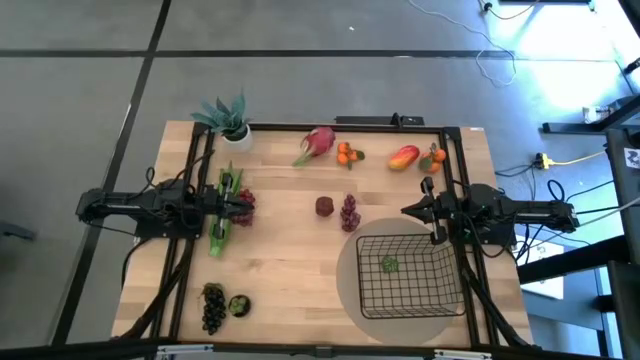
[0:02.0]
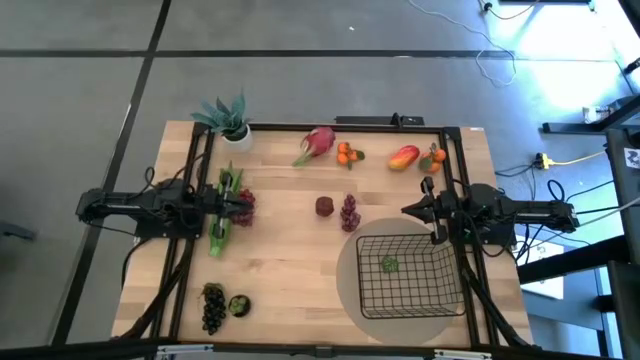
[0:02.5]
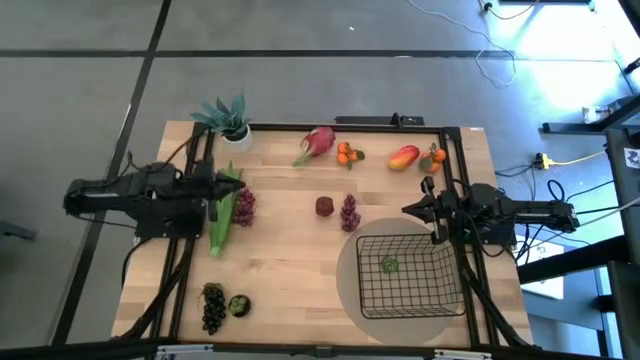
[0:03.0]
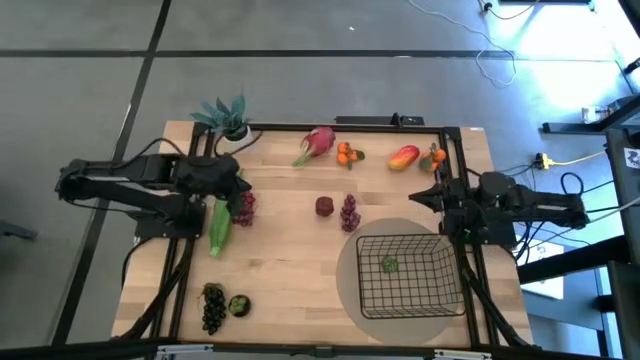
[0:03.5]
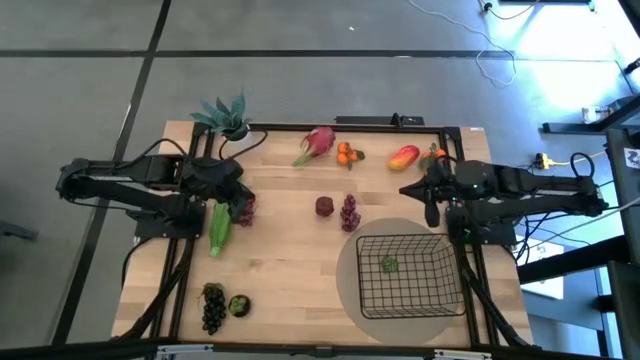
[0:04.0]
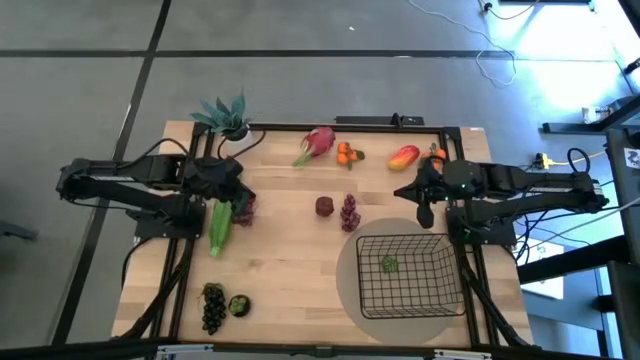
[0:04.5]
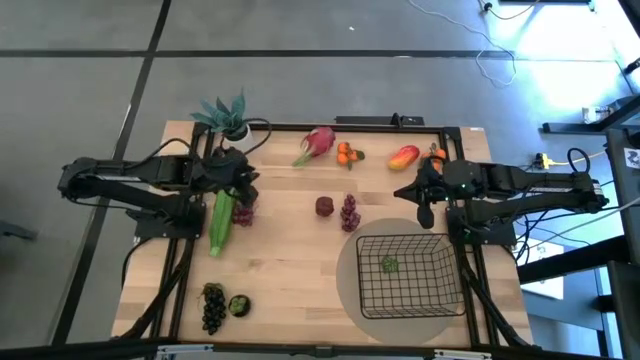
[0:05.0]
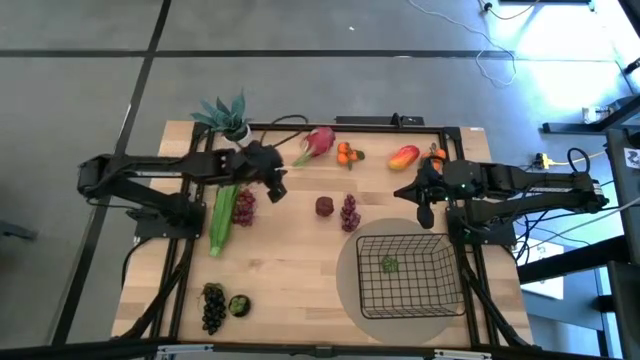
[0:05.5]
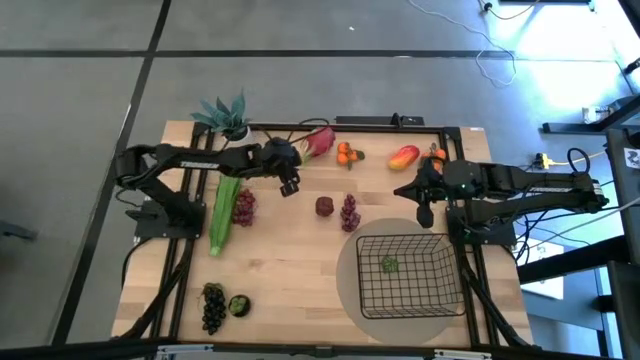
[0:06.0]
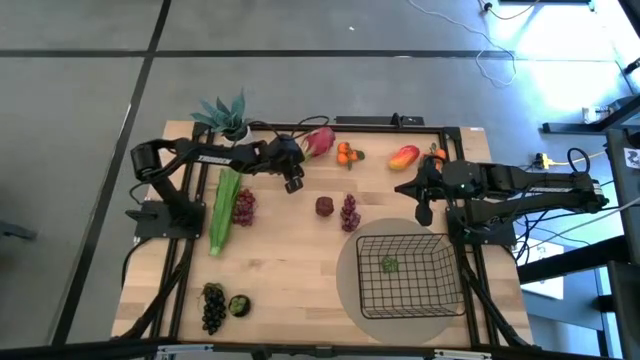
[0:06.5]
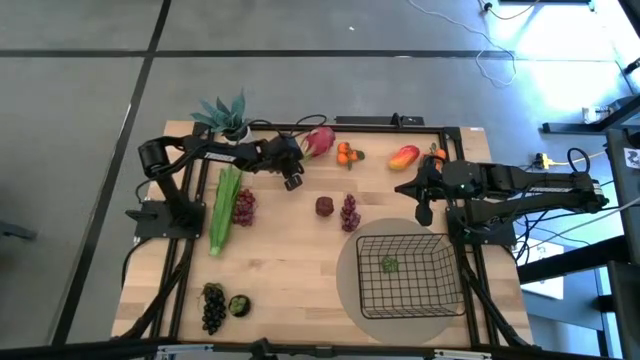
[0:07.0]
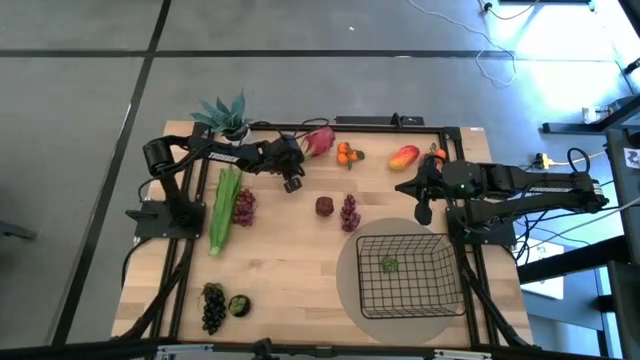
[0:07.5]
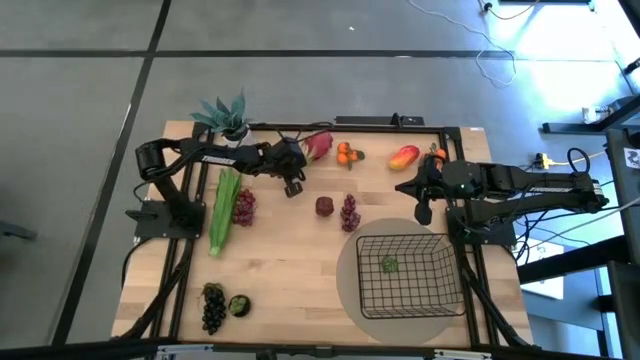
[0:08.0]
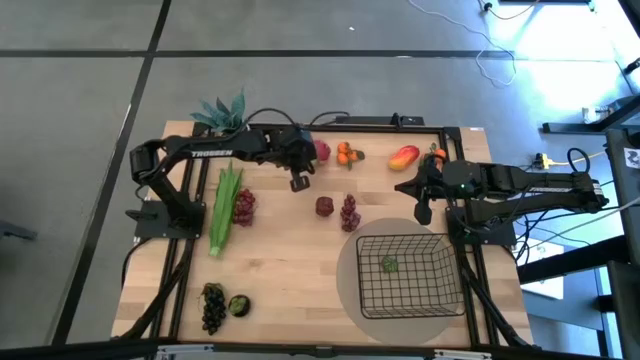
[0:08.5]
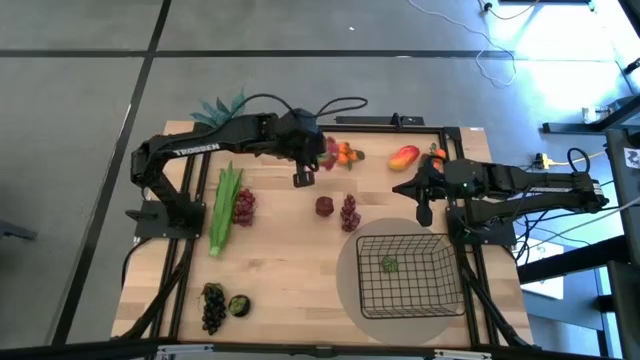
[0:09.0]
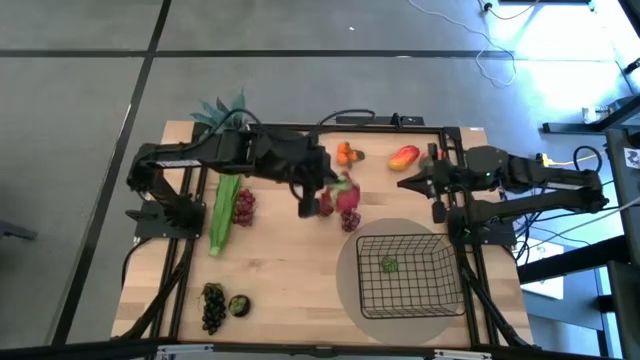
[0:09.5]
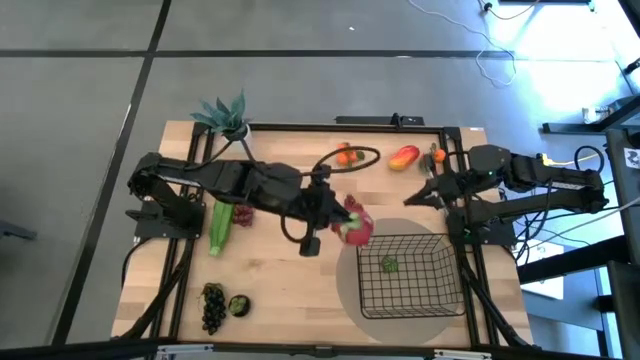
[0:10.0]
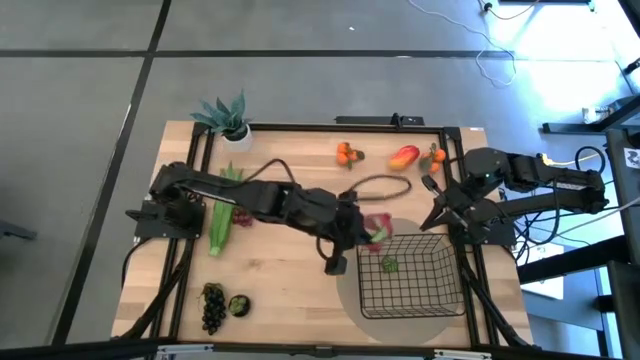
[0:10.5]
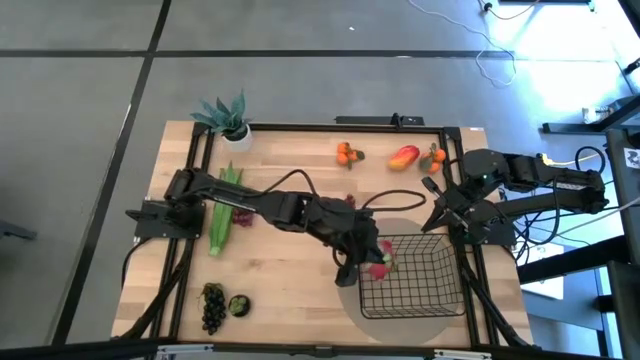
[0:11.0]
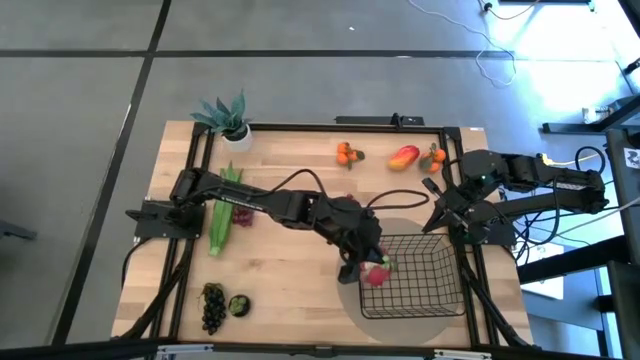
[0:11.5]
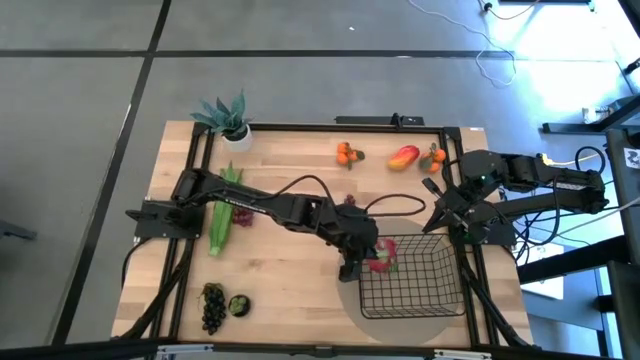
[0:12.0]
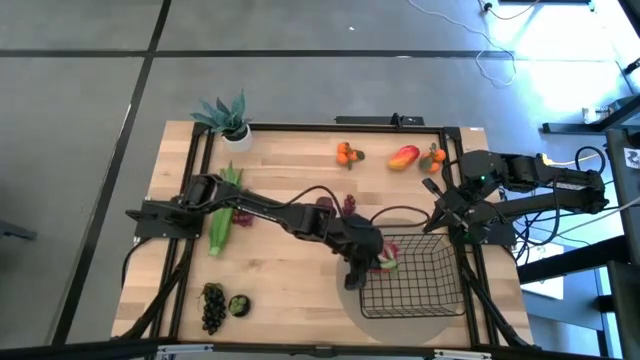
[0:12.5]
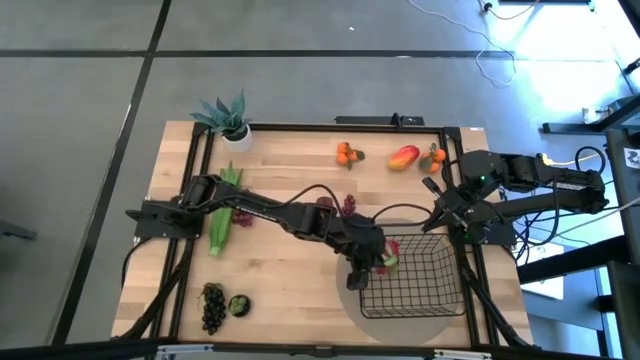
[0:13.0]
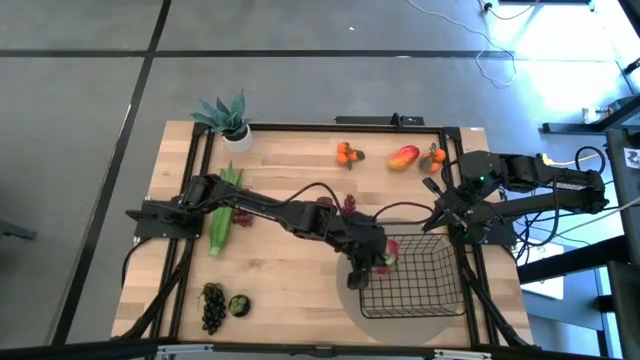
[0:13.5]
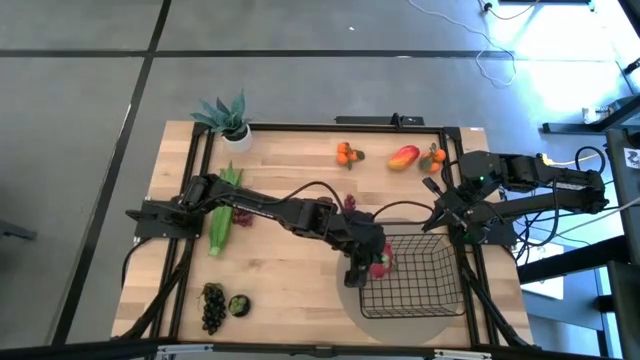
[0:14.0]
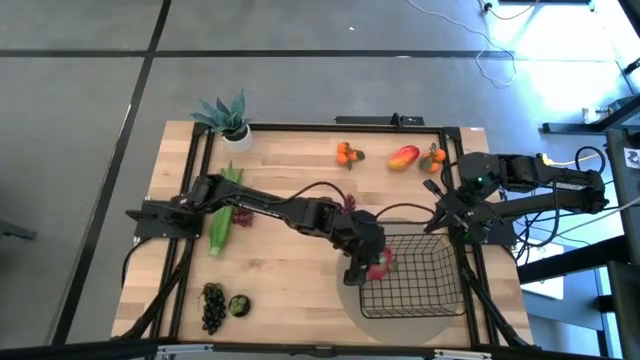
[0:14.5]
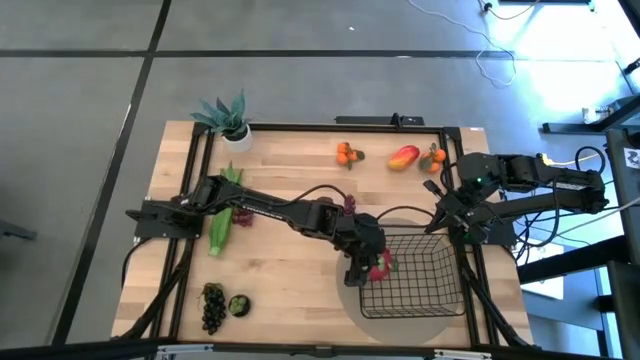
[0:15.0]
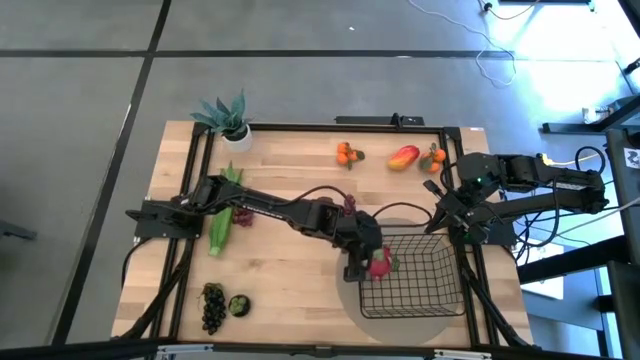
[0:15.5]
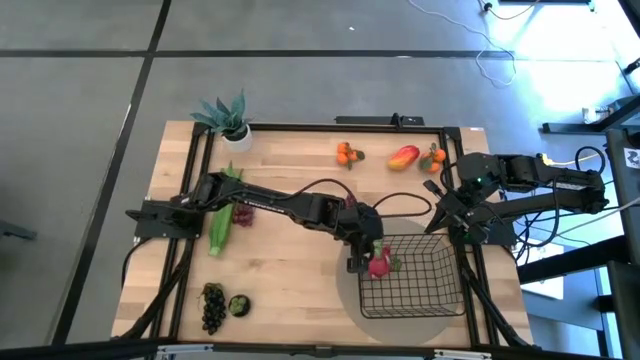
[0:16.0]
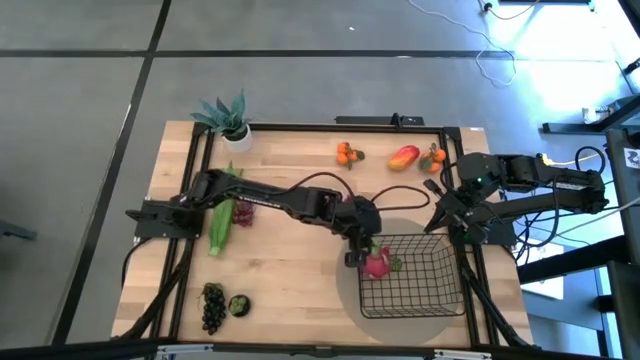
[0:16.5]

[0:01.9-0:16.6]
Task: Build produce basket
Put the red dragon fruit into the black wire basket

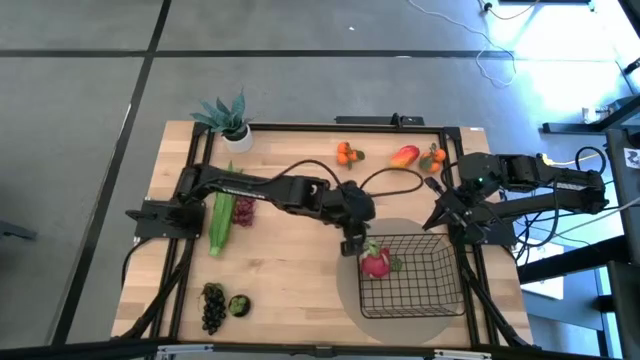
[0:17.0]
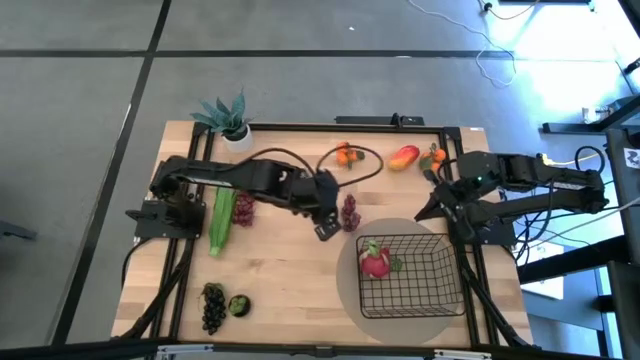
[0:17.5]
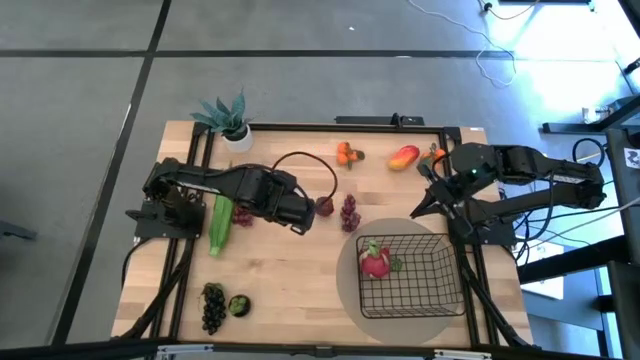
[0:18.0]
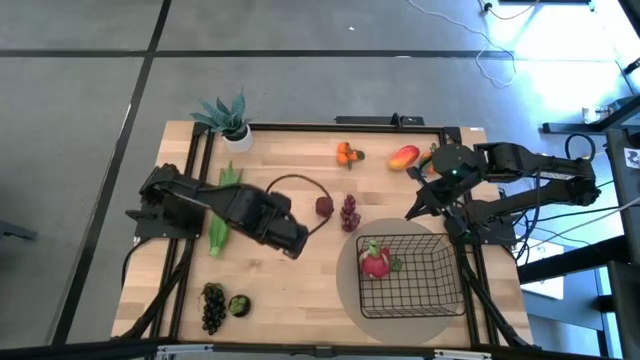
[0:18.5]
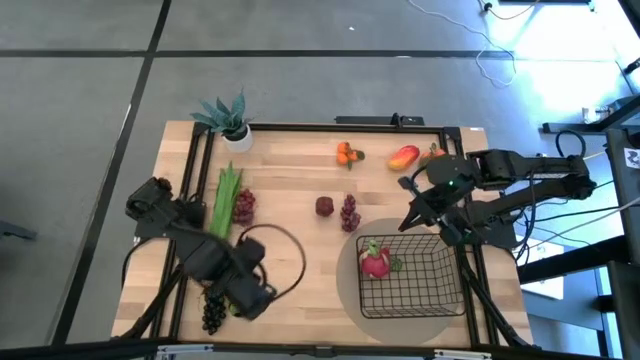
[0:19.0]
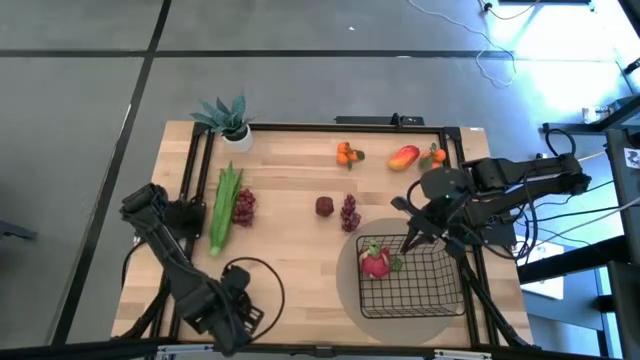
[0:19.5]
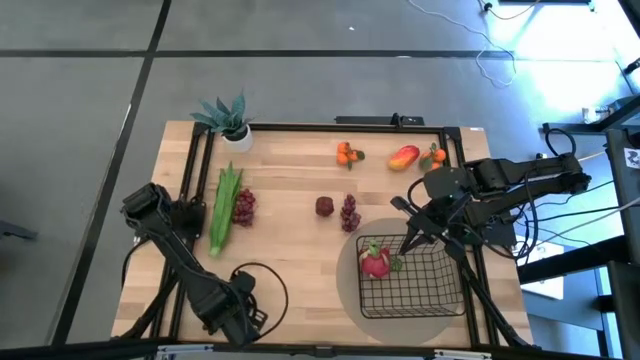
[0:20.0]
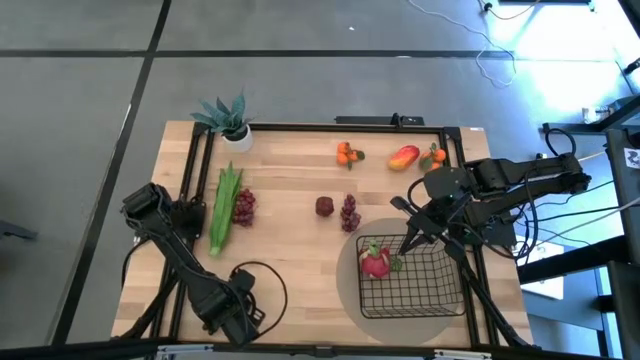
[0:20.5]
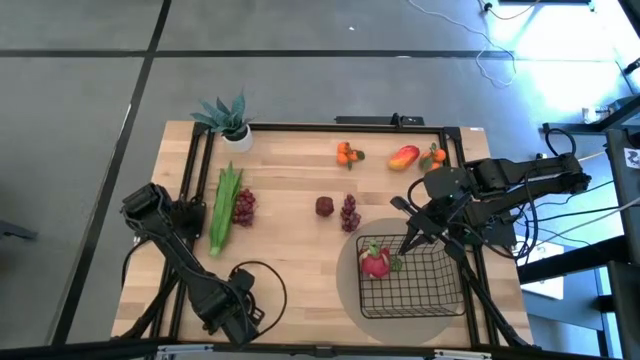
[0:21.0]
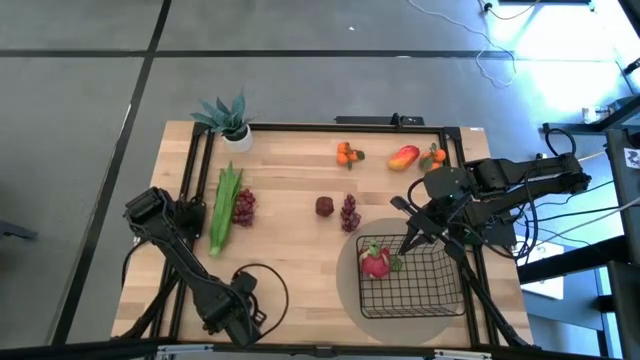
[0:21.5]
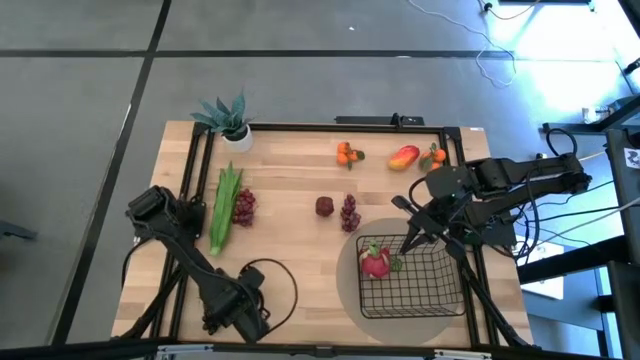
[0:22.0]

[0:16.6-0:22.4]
Put the black mangosteen into the black wire basket
